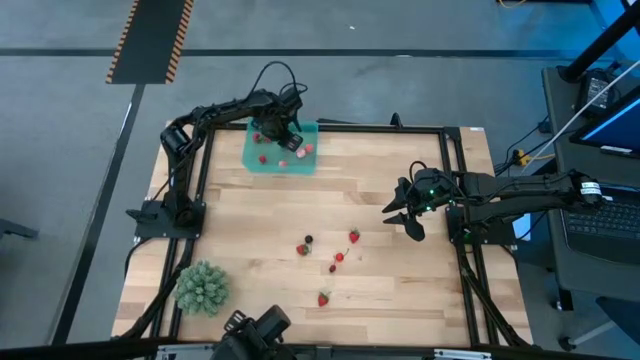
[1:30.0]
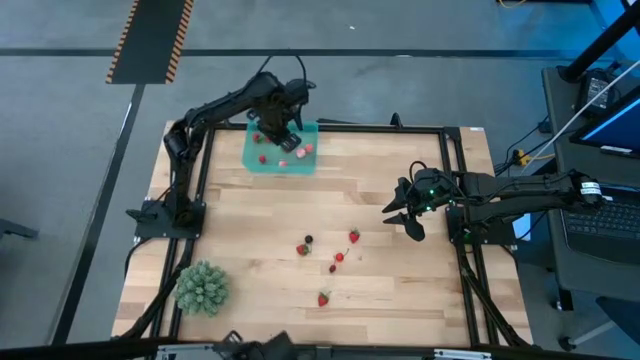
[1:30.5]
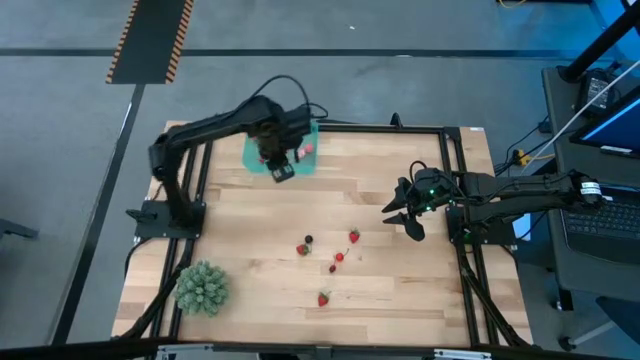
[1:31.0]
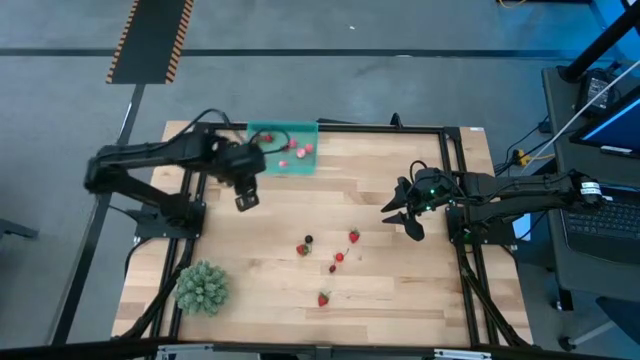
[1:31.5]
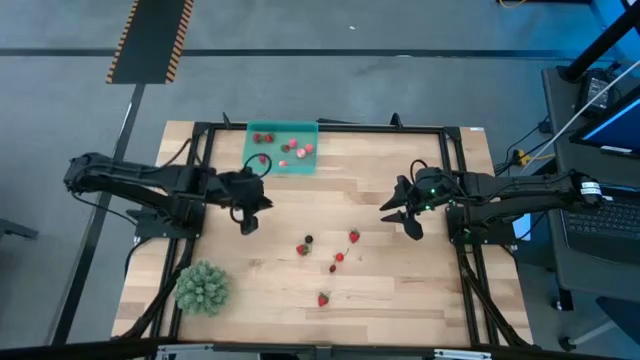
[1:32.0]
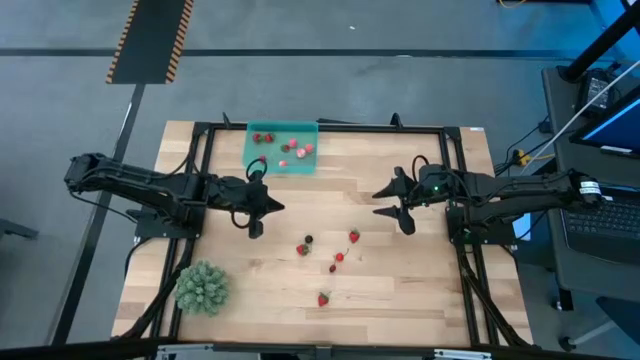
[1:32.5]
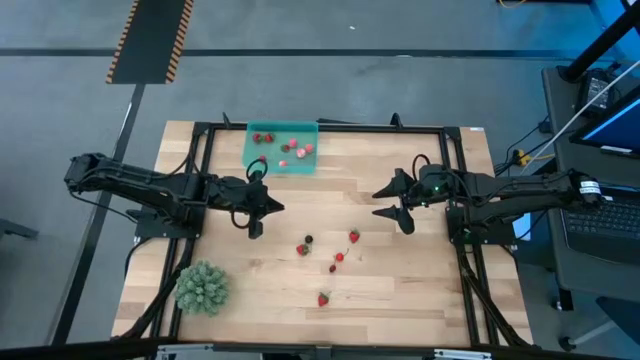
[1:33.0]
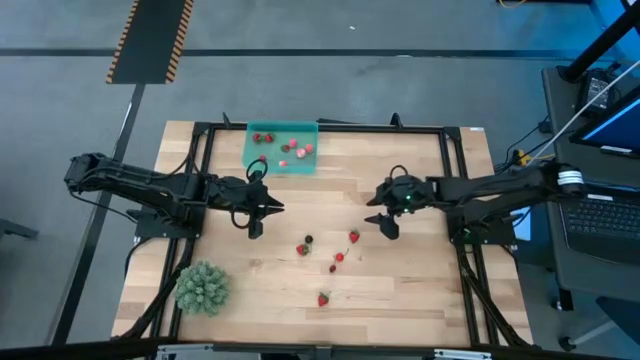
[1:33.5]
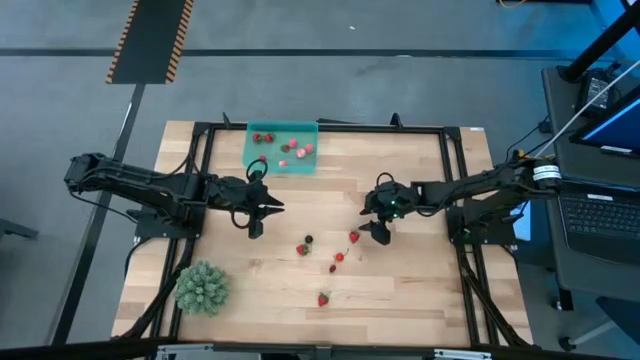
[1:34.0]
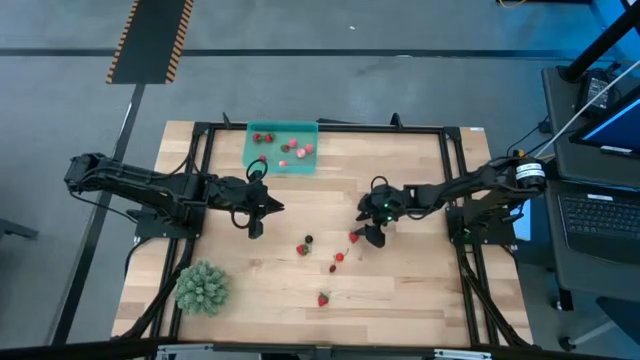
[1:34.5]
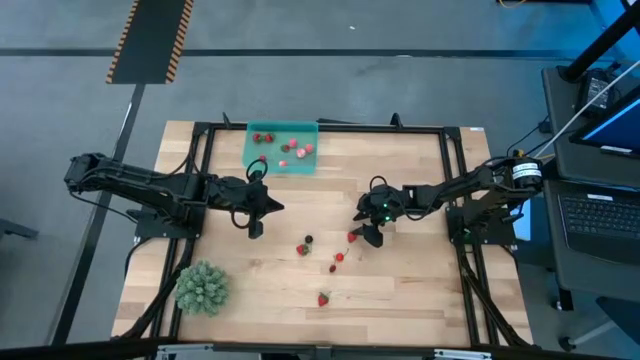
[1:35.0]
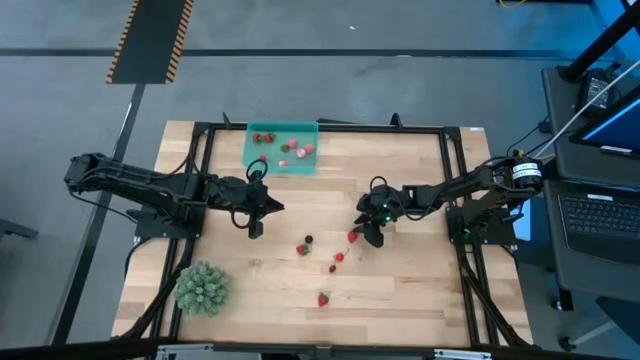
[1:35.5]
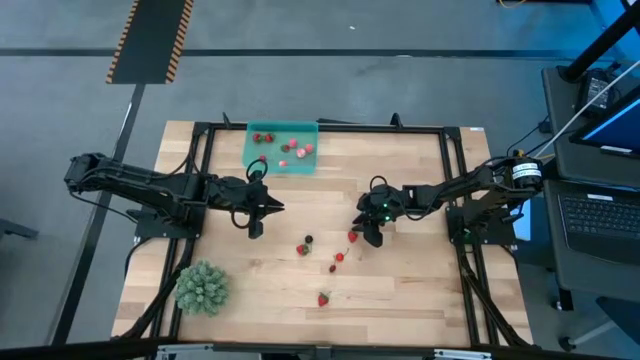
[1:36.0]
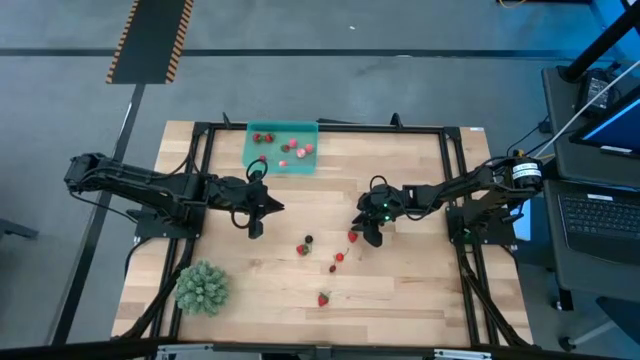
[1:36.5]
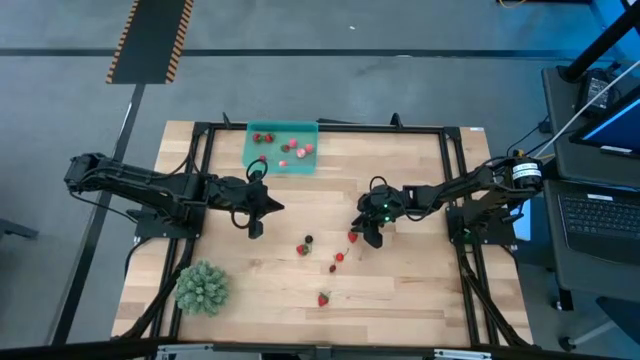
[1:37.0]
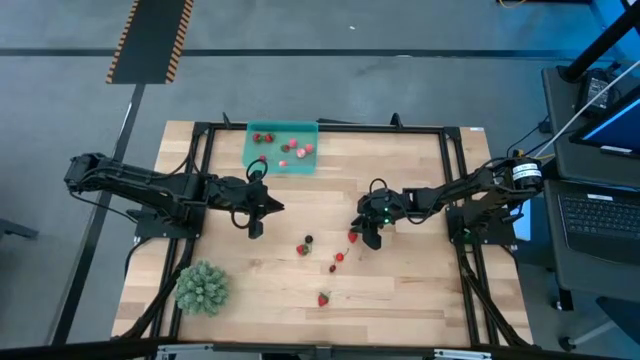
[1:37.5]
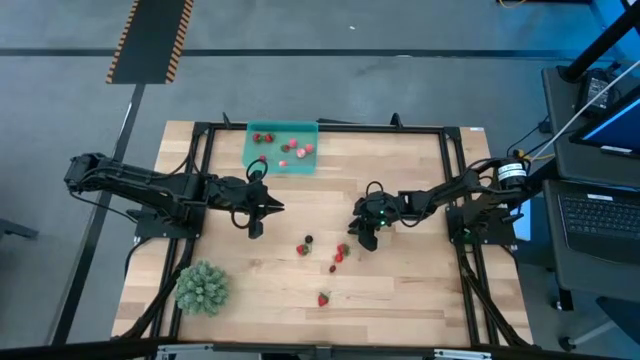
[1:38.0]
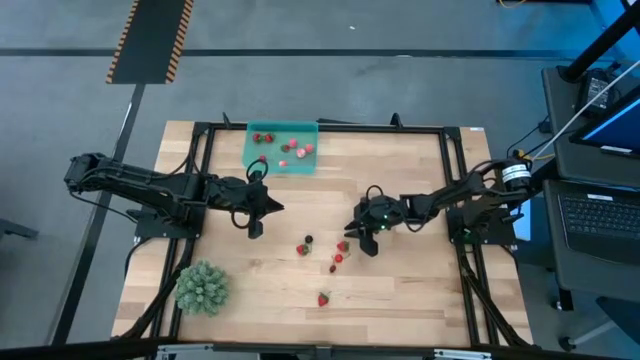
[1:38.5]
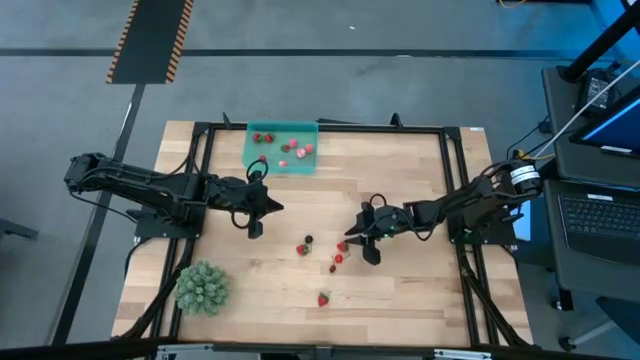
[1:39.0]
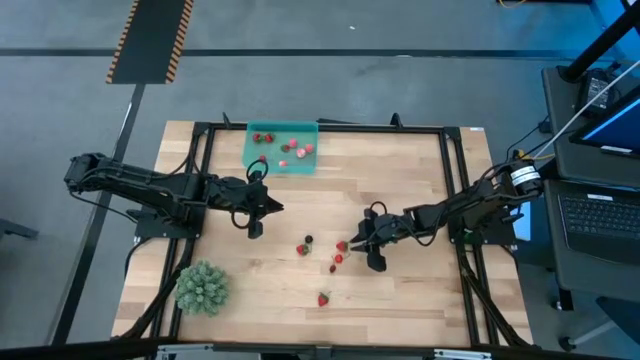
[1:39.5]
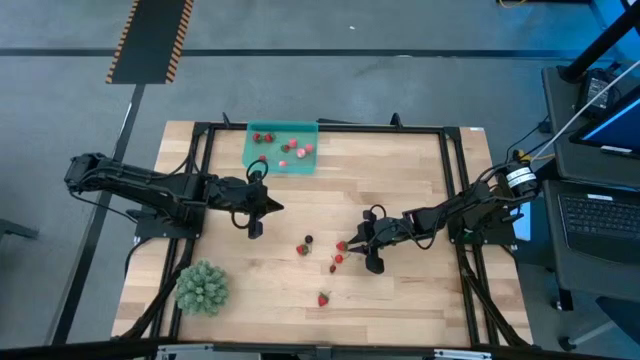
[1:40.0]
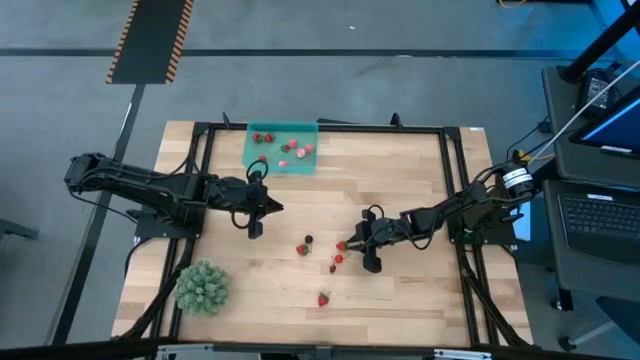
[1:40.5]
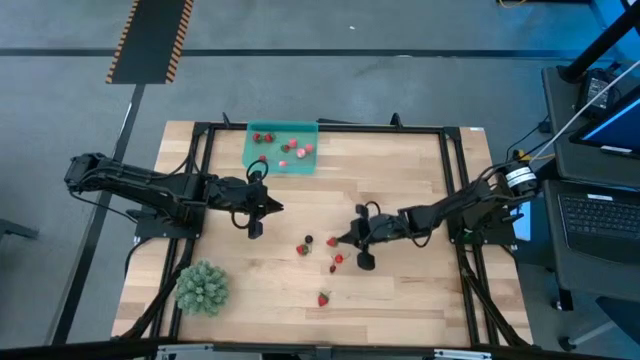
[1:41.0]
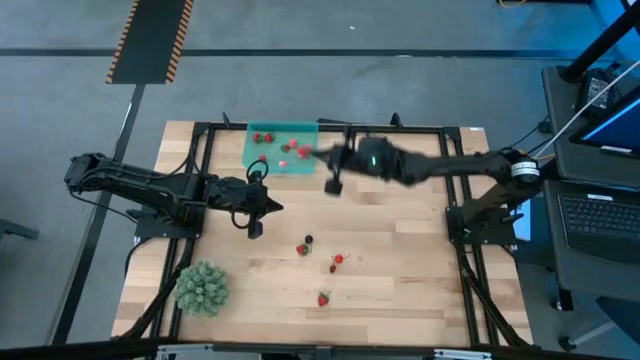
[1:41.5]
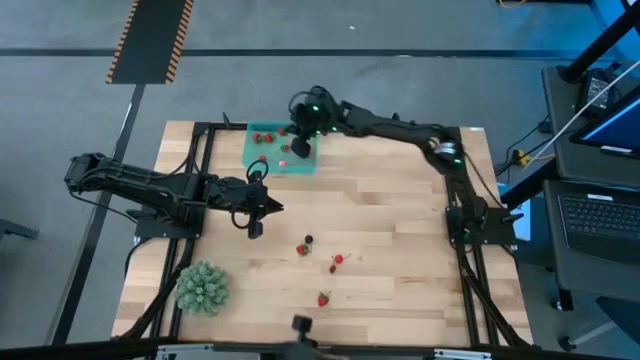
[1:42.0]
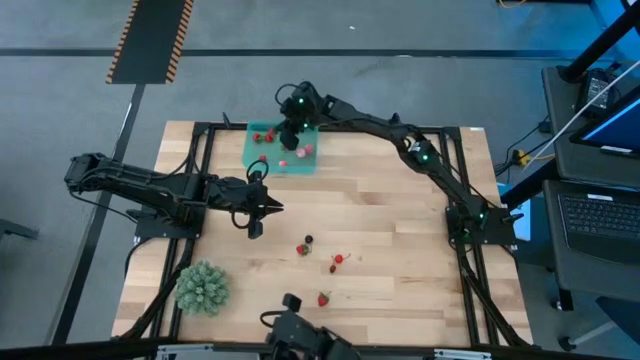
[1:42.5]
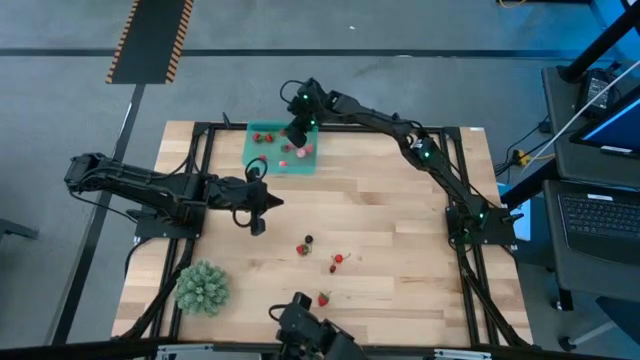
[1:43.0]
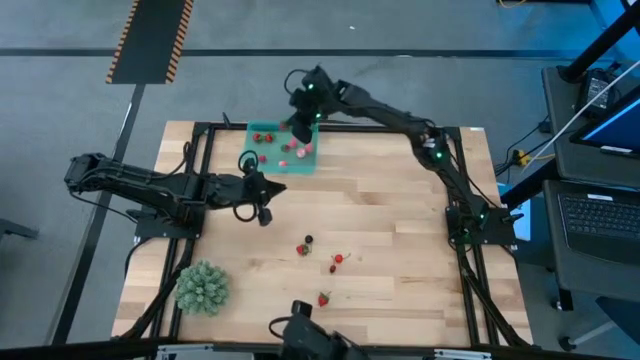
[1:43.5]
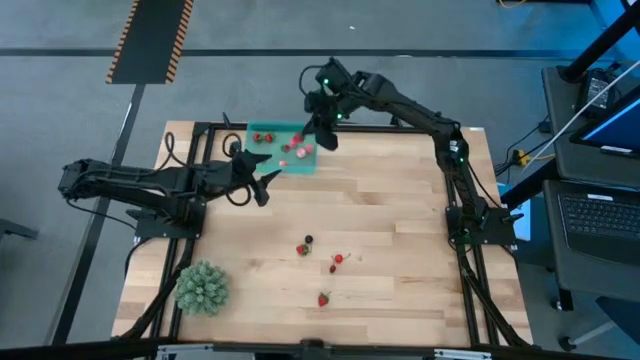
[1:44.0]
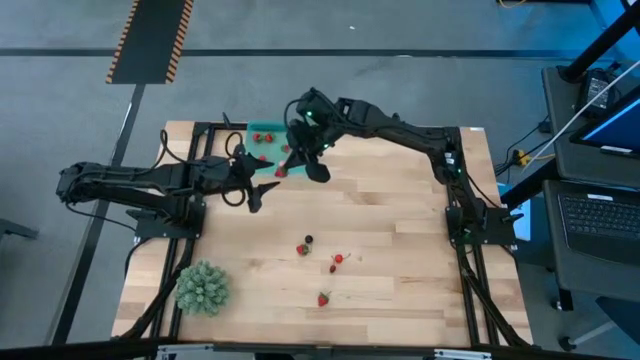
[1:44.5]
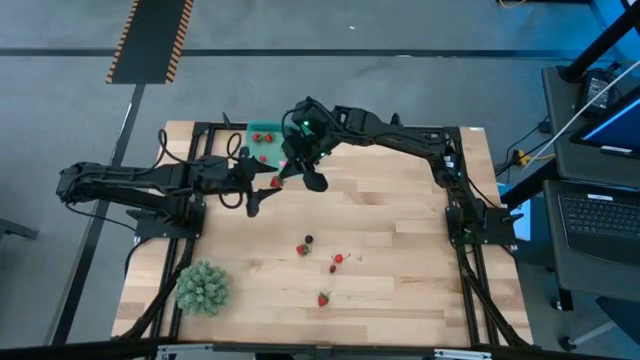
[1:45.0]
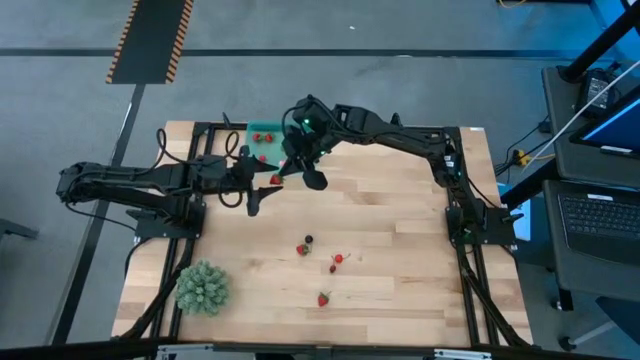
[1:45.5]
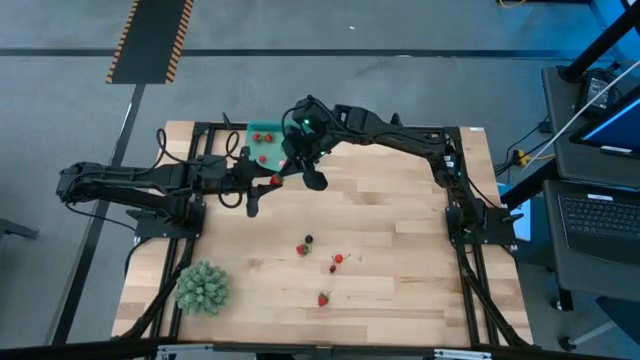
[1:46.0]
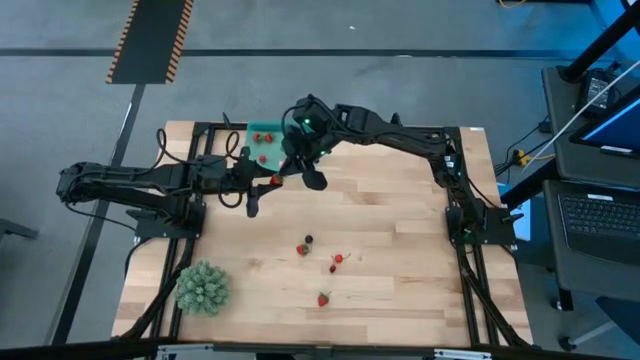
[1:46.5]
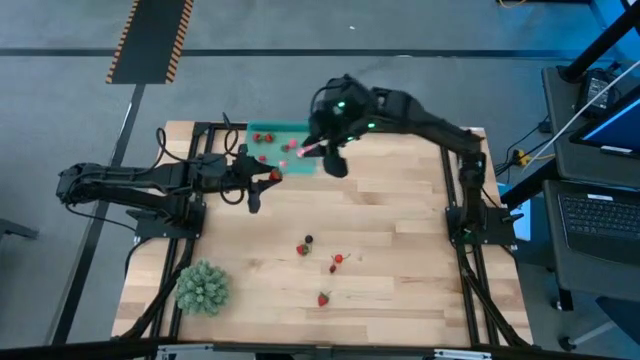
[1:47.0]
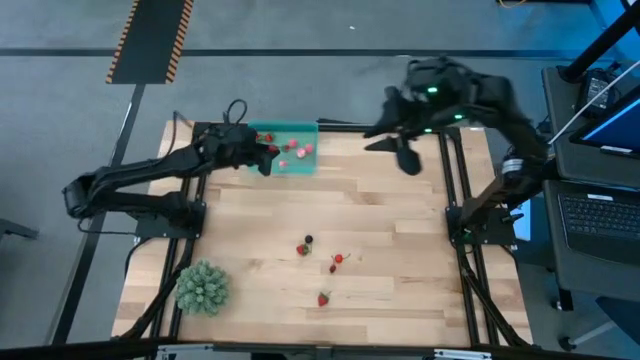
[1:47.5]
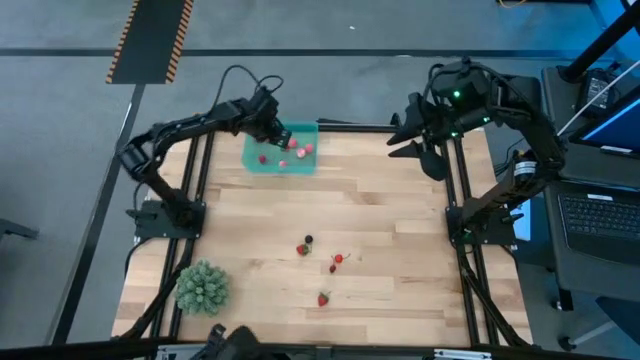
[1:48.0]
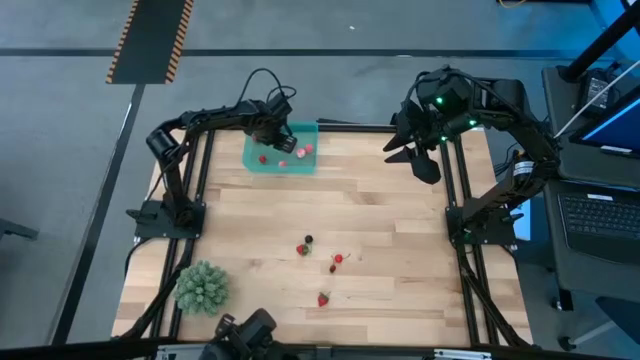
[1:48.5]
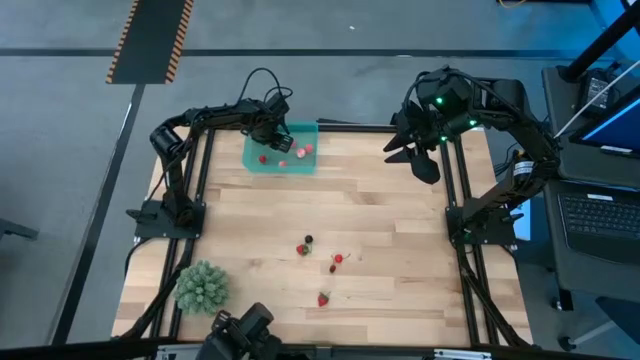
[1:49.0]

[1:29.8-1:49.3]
Task: Pick and placing Produce into tupperware
Put the red strawberry into the blue bin
